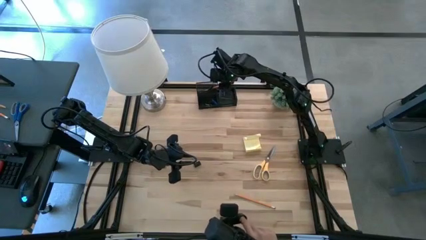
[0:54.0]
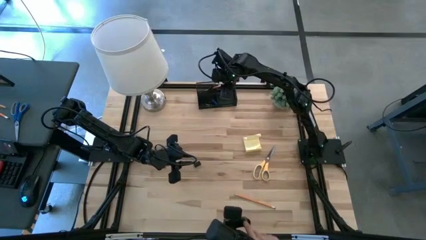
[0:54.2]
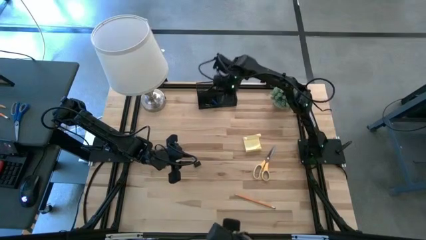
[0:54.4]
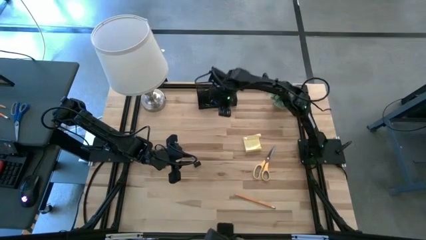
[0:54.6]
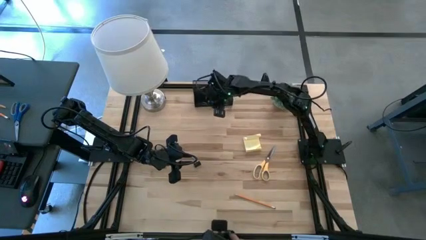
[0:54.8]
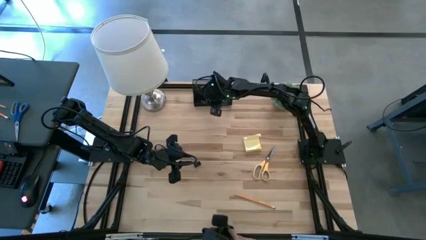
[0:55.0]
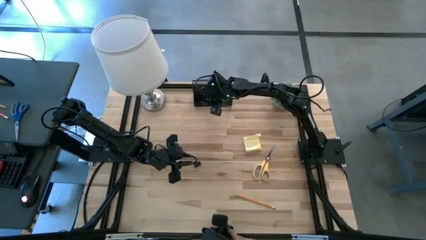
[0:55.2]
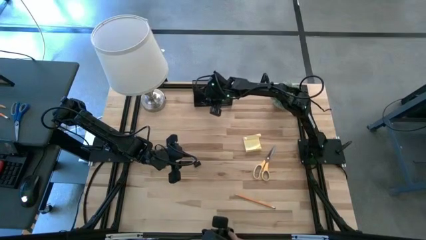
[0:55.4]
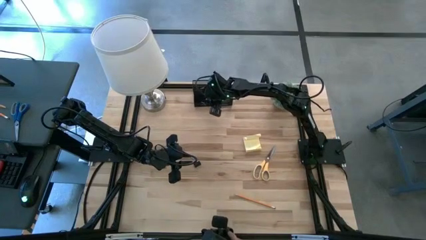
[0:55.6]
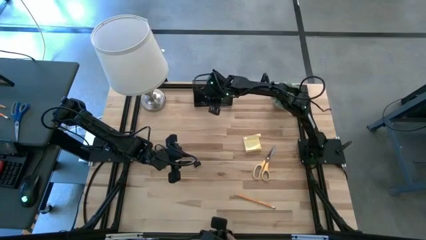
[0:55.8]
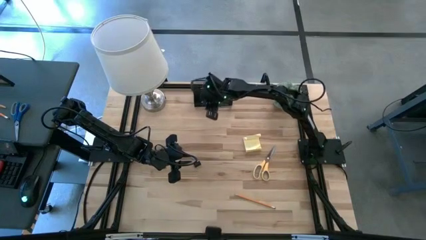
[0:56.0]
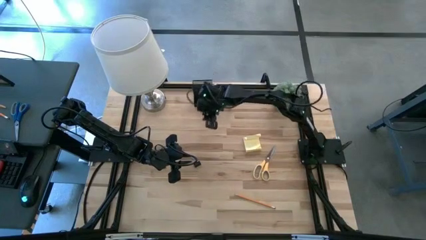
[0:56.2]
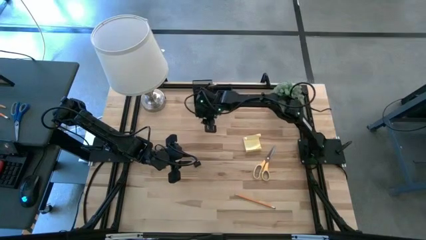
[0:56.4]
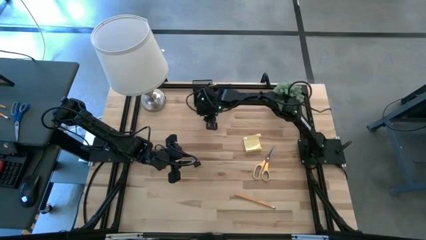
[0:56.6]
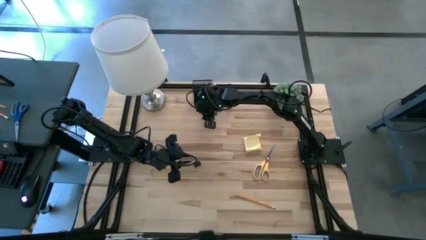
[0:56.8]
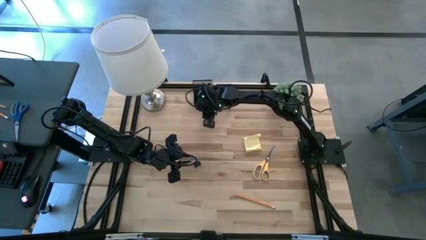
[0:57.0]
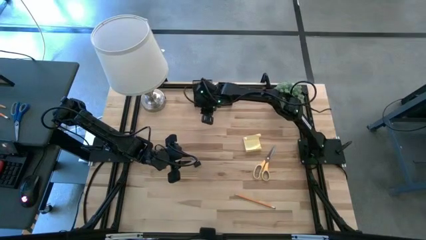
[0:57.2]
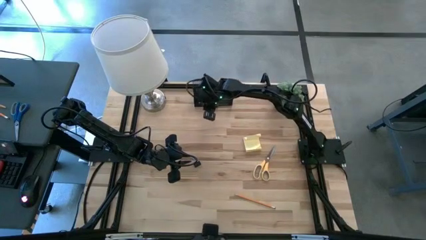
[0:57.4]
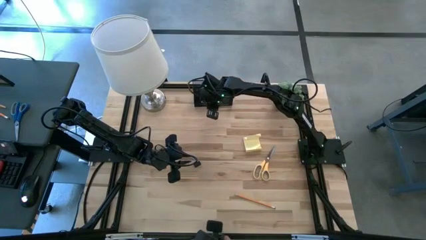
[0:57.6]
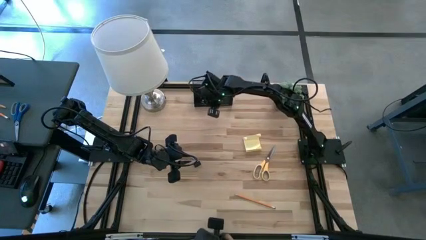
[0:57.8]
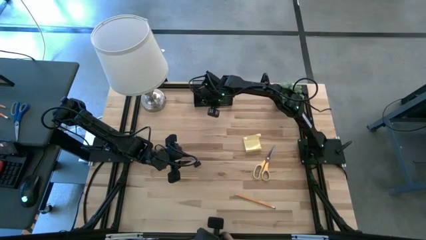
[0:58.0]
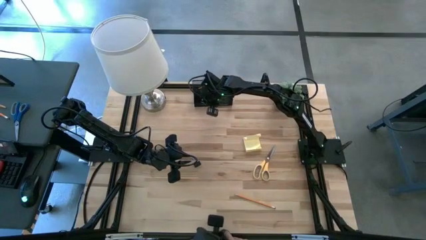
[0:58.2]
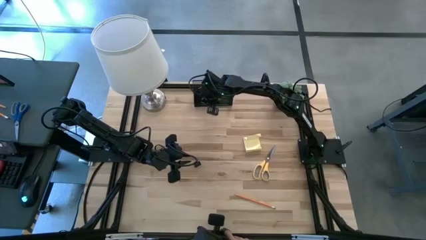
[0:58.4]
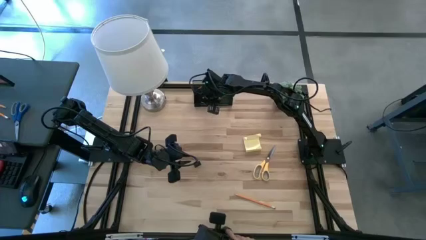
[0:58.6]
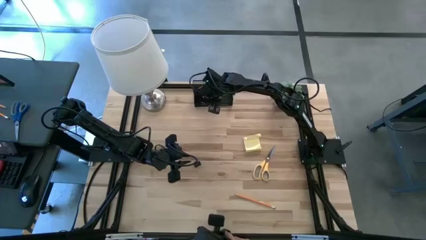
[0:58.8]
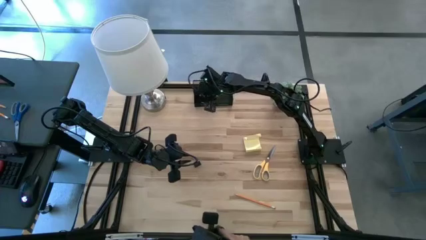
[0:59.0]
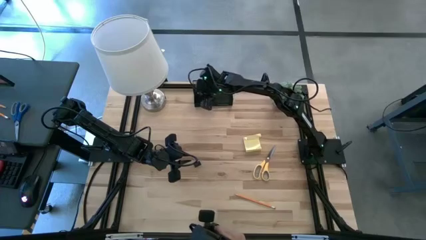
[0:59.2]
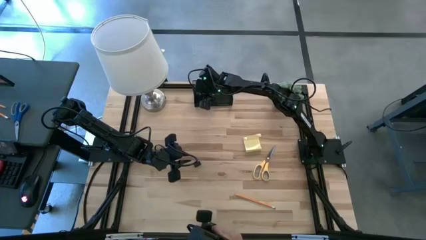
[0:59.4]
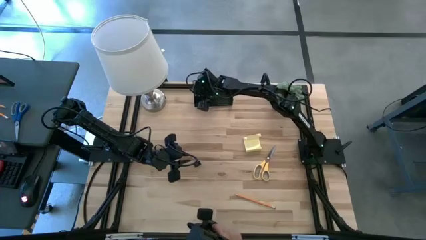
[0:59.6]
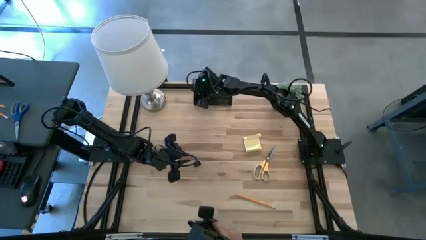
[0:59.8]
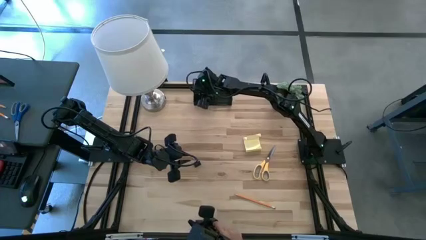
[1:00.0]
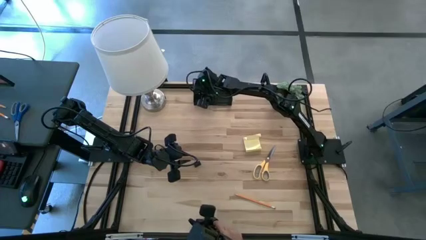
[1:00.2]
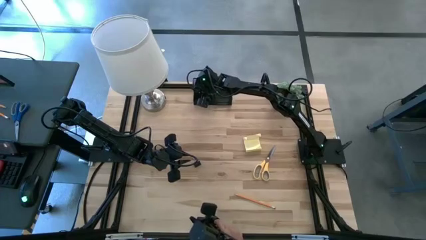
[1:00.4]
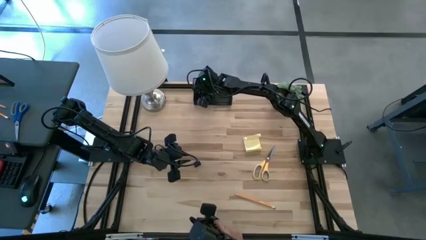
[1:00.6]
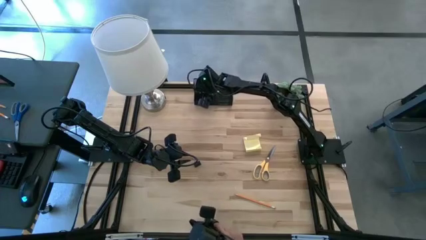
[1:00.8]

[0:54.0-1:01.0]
Task: Pick and place office supplies into organizer
Adjust the black desk organizer

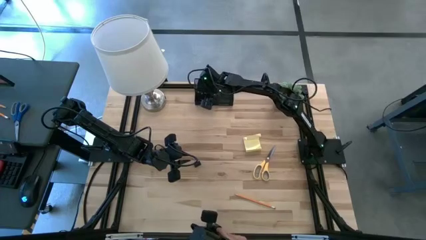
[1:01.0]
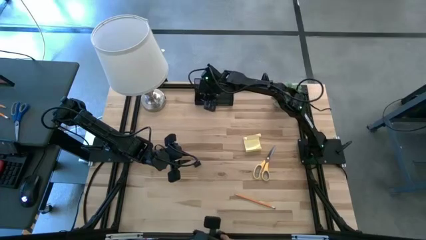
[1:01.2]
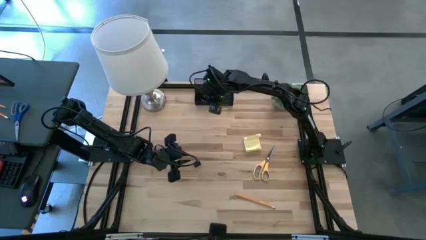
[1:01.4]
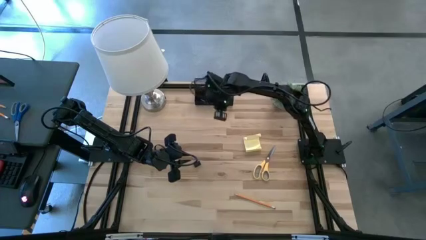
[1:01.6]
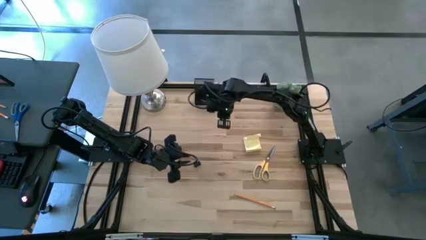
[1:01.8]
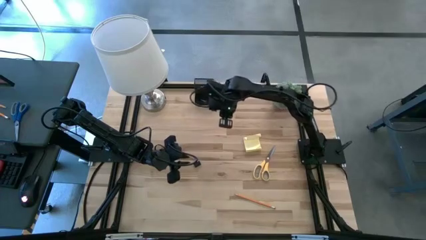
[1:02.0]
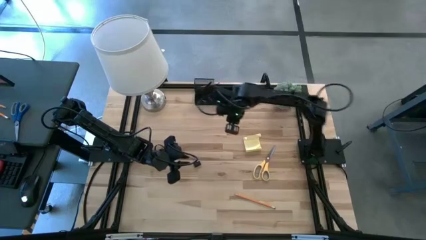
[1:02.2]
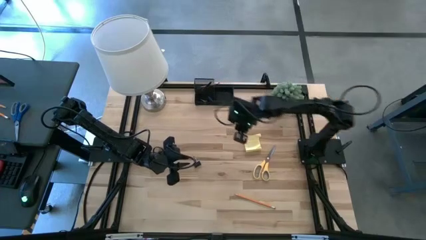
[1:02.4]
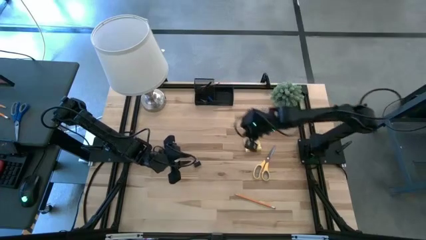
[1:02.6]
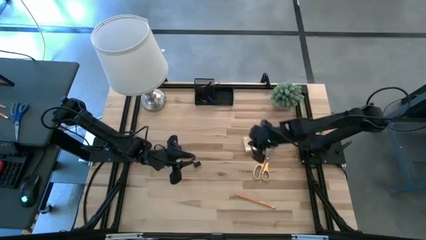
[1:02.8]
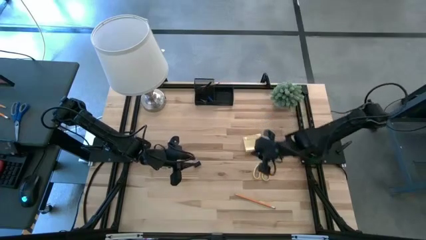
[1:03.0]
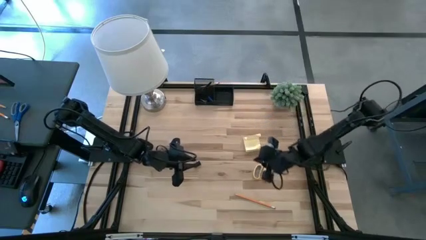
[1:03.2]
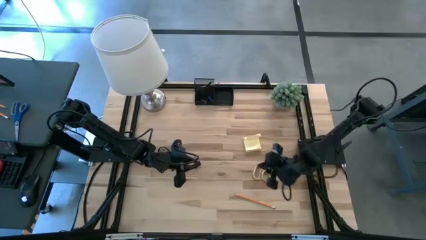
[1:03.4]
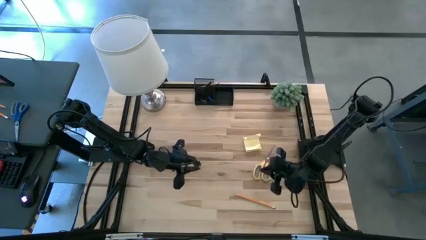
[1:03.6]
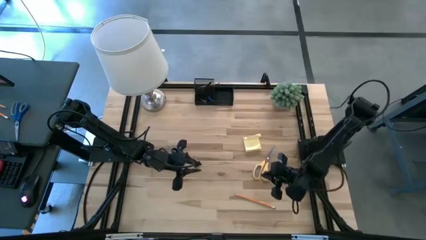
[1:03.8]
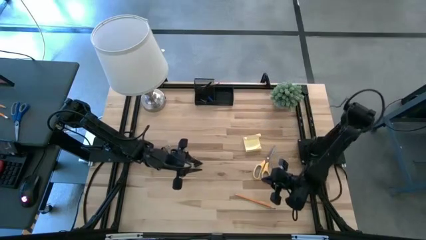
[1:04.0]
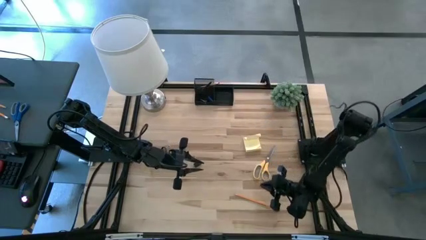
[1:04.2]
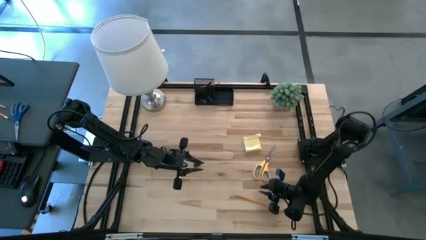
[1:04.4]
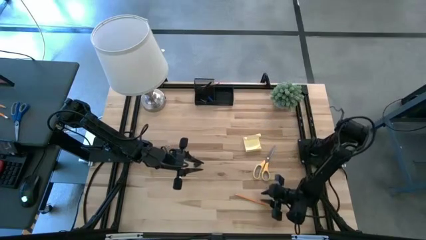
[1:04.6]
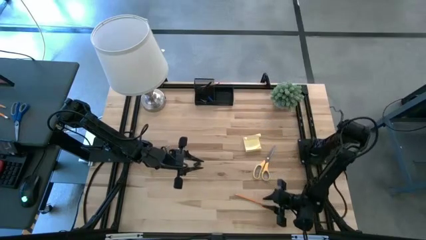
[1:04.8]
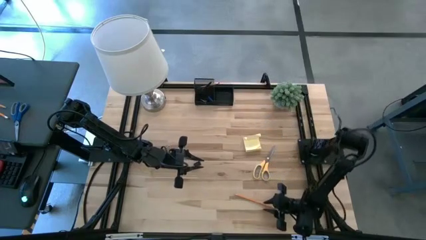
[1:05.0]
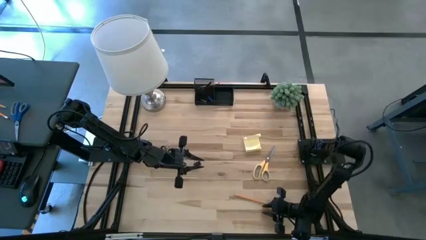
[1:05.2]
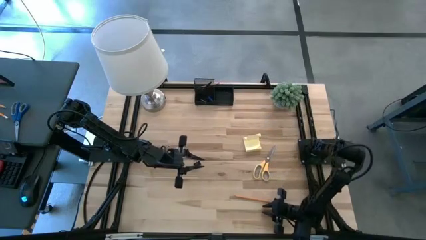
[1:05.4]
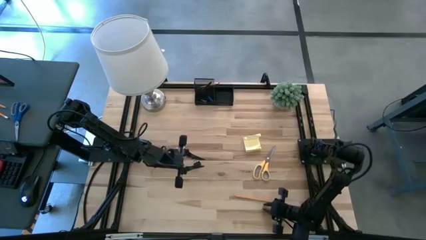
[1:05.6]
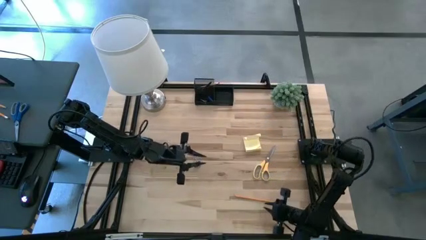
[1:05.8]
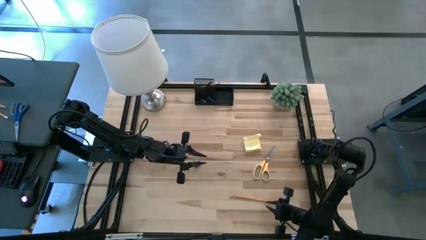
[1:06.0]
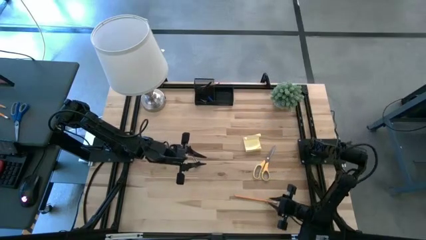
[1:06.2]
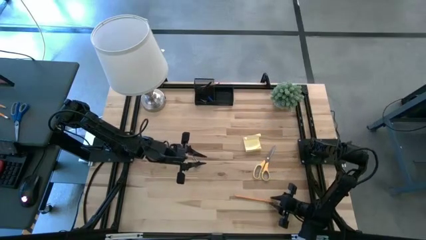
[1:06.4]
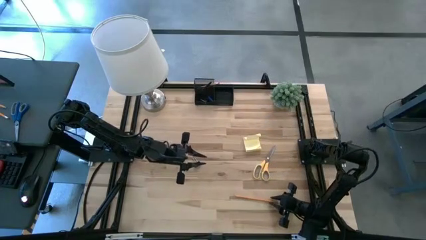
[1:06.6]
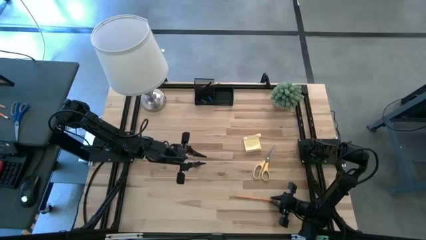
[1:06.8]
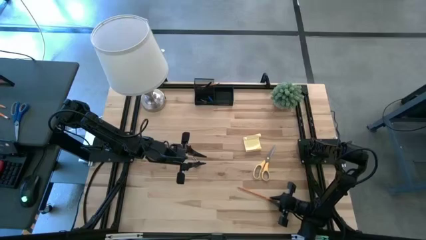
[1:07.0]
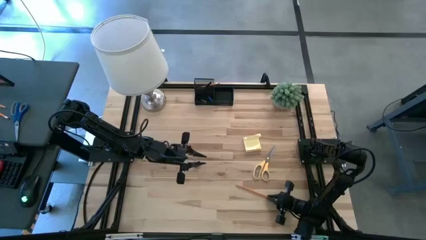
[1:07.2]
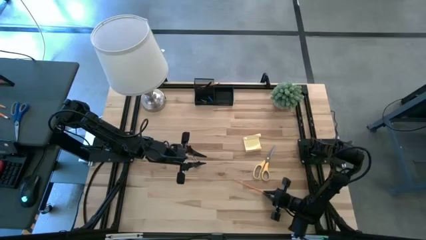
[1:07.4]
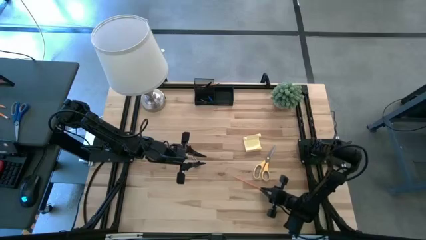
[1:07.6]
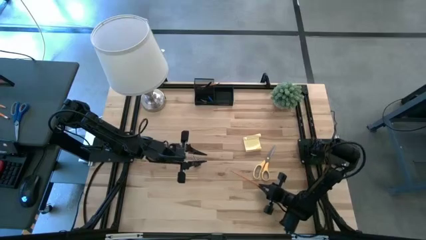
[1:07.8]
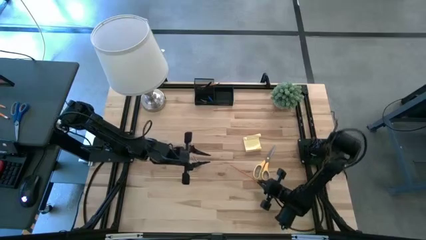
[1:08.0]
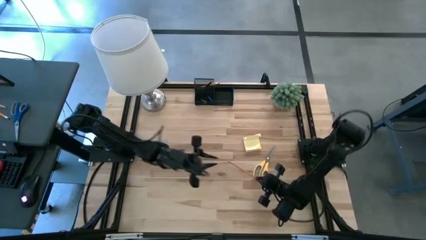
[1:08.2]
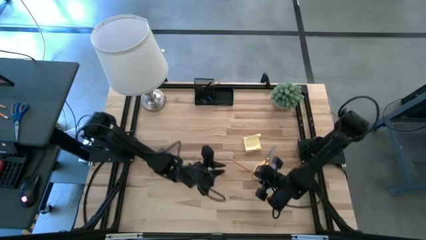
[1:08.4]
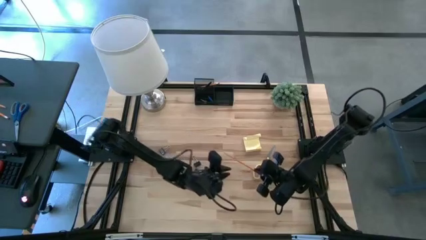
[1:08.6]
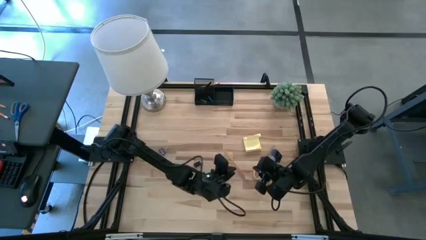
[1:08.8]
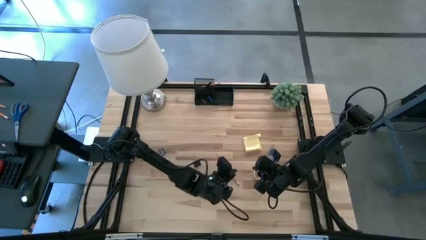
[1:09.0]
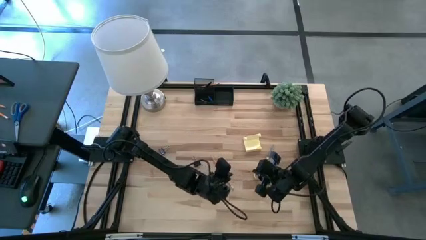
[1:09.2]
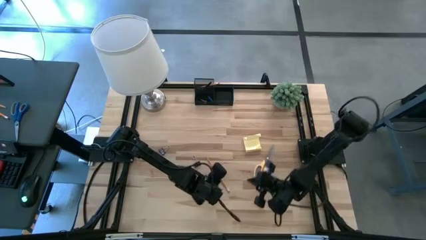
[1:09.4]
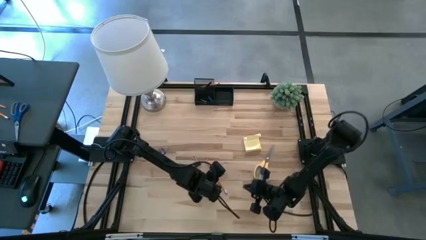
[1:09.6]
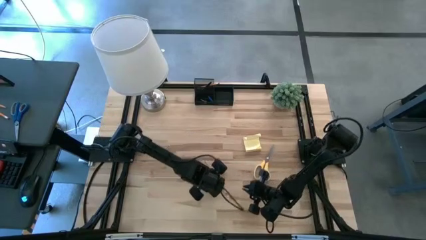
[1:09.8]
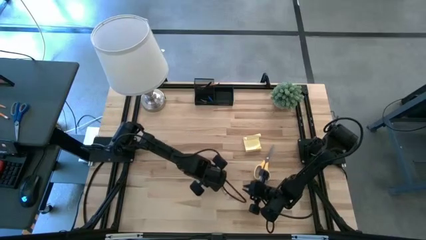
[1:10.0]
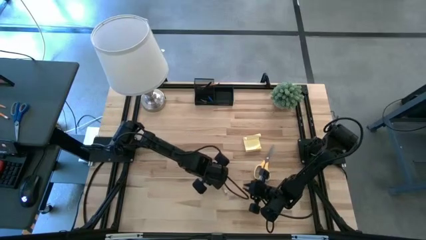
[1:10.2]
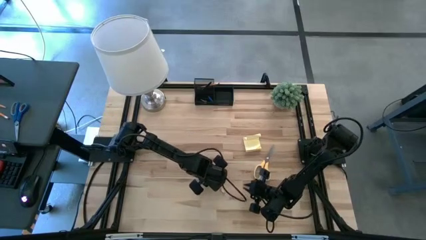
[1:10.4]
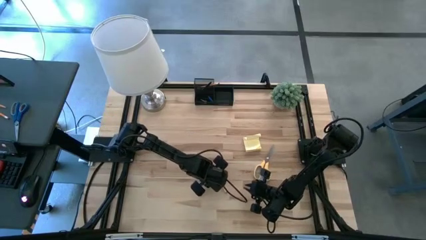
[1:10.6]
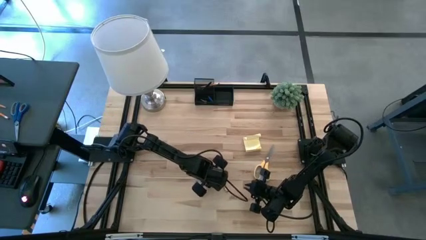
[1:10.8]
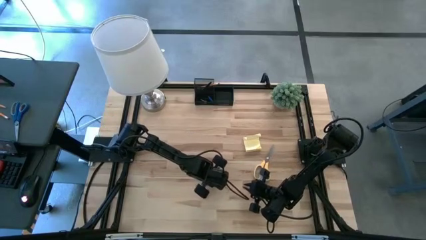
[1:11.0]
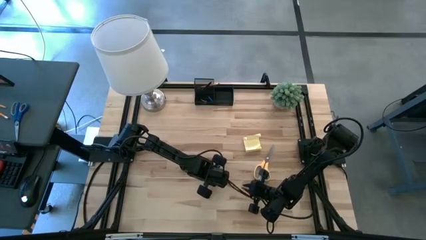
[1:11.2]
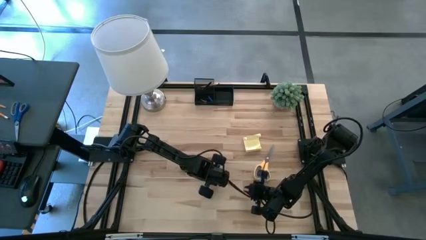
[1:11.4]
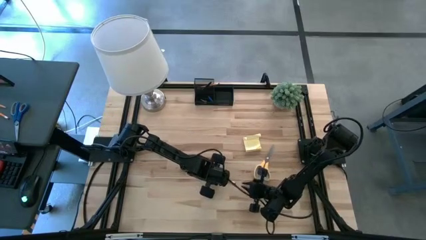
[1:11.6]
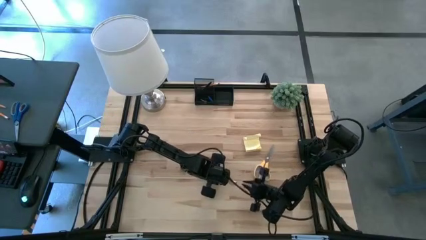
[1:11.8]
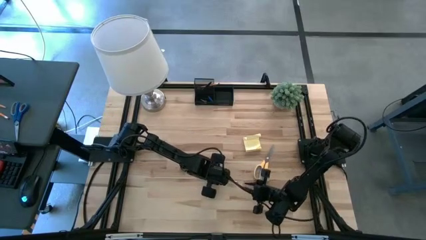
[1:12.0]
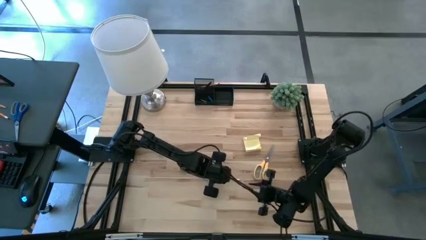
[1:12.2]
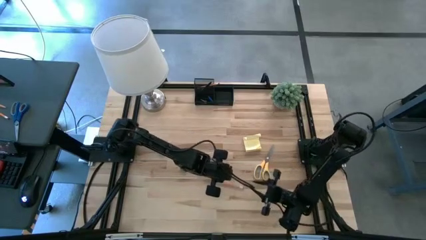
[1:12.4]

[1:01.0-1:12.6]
Put the orange pencil into the black desk organizer
